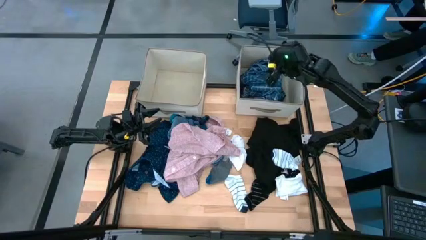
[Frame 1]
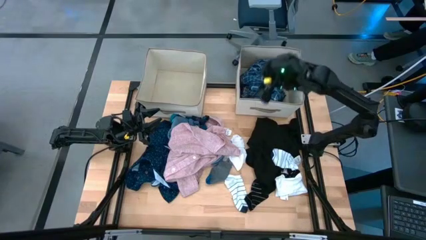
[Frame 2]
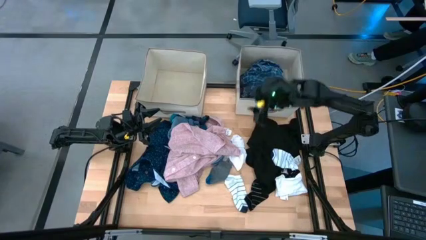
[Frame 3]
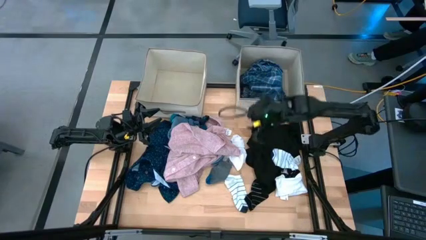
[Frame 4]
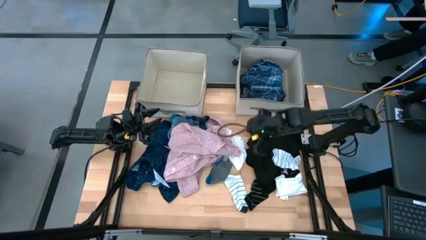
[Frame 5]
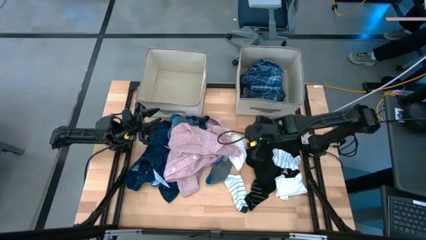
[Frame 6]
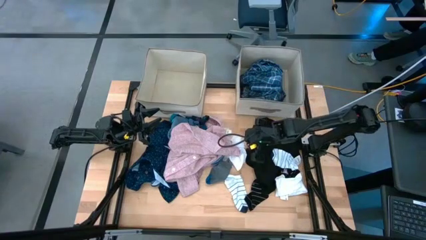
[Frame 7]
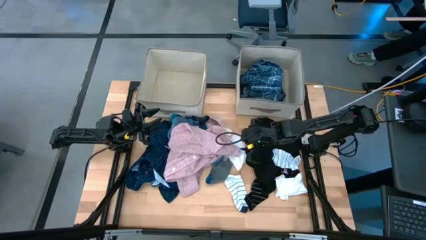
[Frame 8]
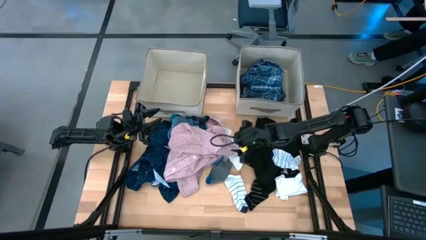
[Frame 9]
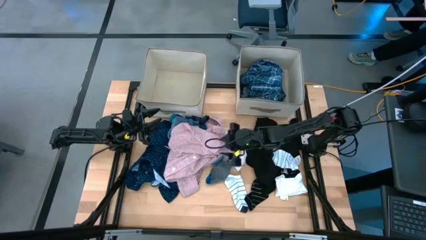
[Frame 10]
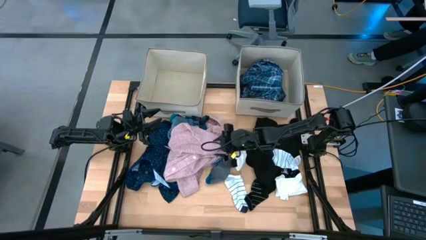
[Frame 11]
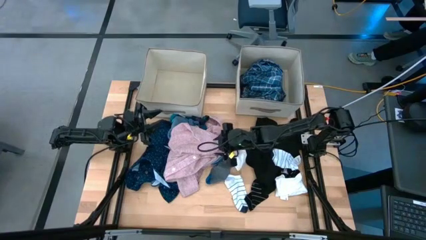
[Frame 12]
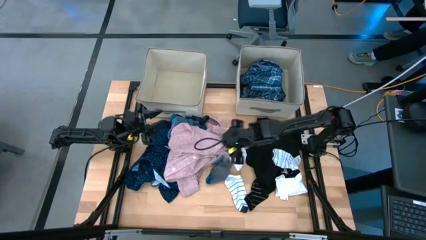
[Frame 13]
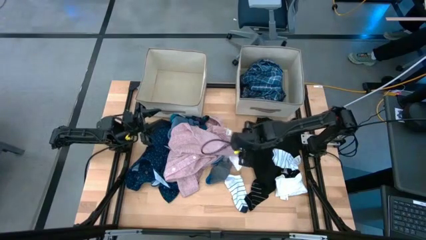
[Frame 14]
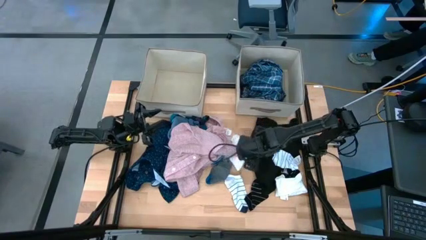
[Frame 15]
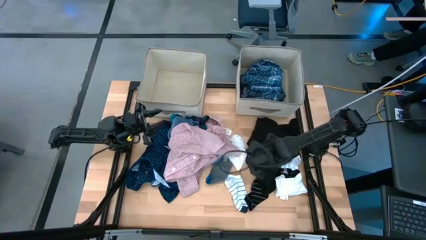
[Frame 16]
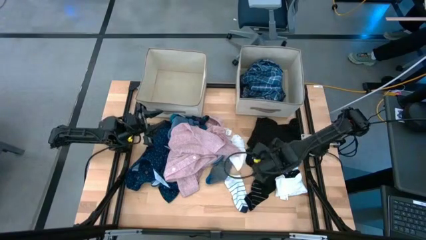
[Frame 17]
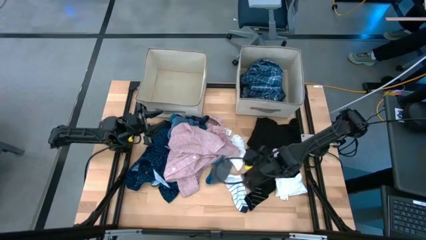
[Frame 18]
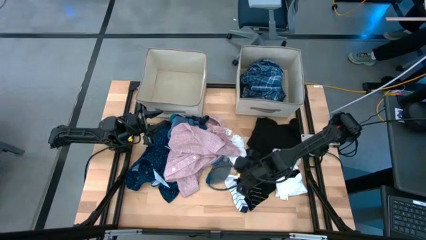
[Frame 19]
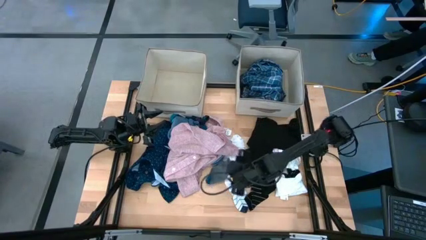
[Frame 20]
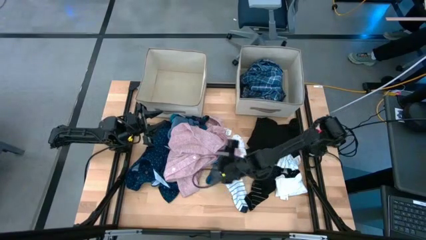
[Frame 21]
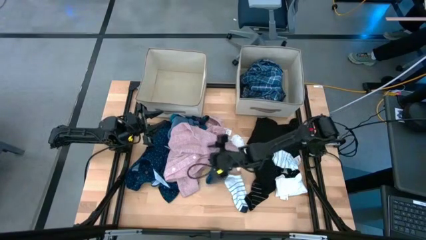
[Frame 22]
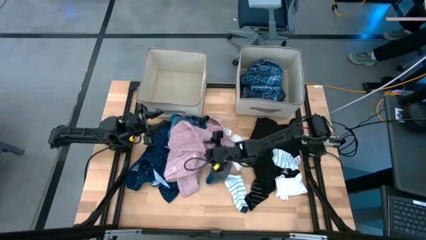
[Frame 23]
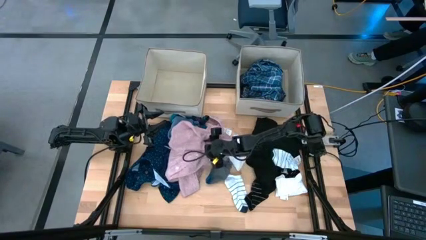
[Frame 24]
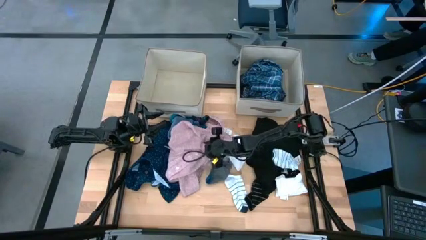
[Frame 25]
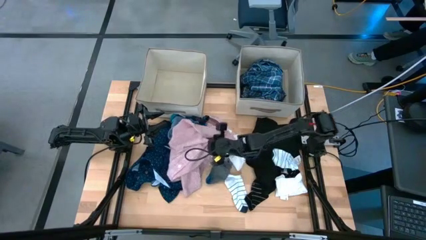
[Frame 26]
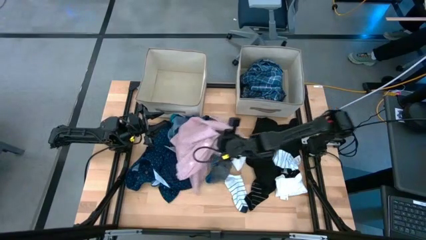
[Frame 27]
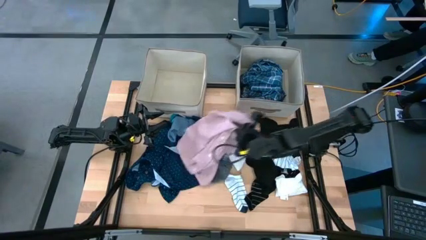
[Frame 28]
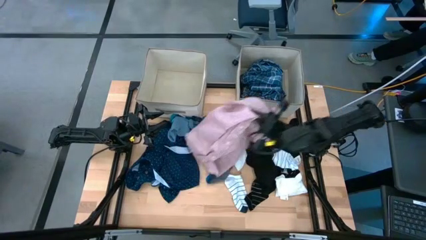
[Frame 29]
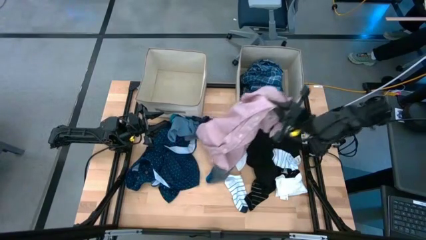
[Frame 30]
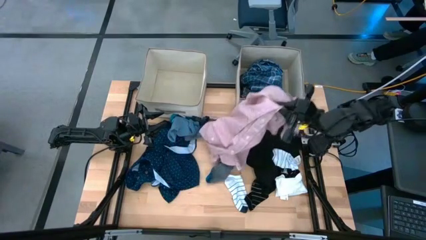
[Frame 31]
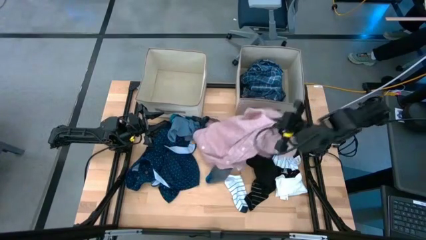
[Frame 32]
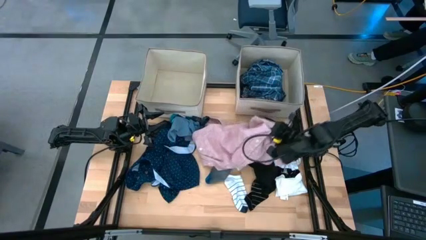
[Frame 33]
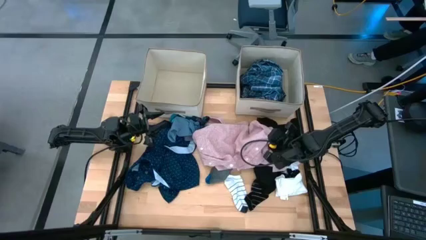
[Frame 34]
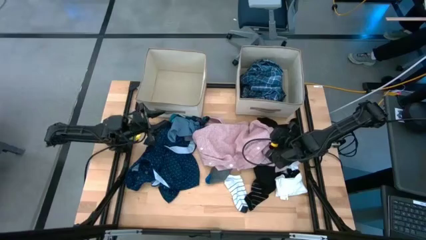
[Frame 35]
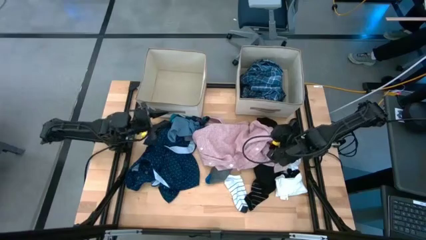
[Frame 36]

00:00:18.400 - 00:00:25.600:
Task: Sort clothes
Adjust the pink shirt

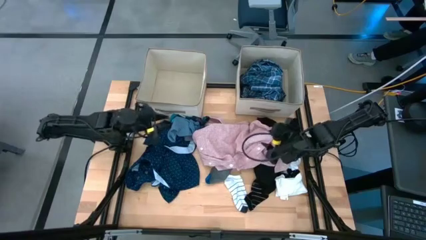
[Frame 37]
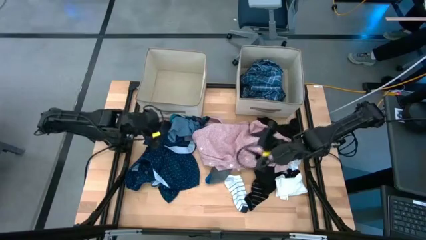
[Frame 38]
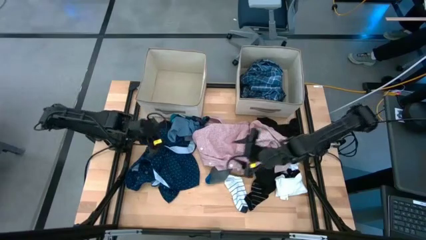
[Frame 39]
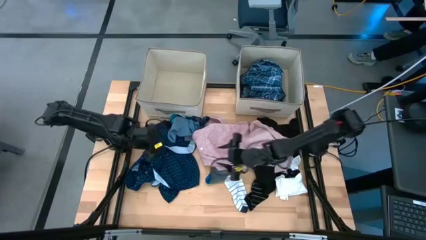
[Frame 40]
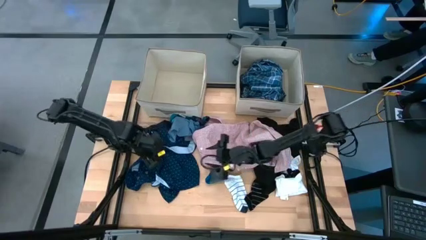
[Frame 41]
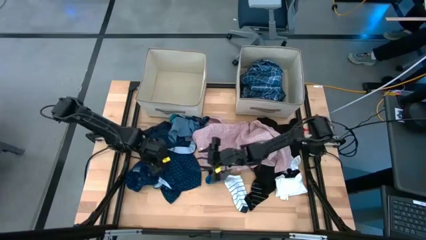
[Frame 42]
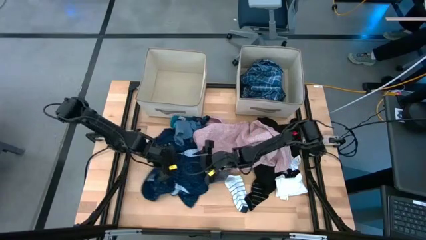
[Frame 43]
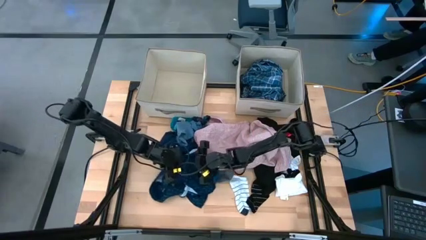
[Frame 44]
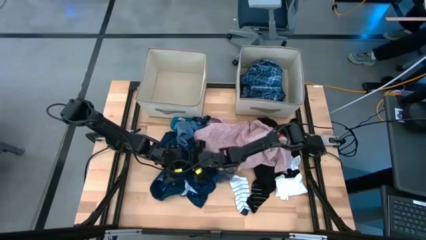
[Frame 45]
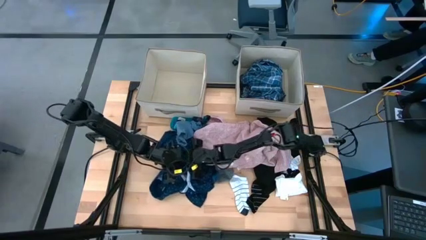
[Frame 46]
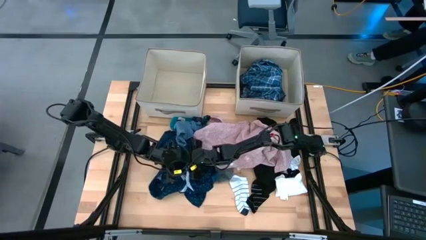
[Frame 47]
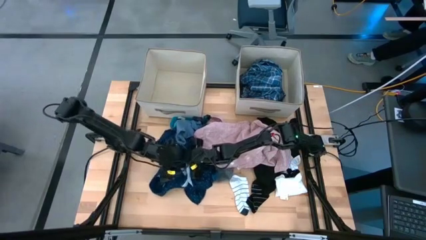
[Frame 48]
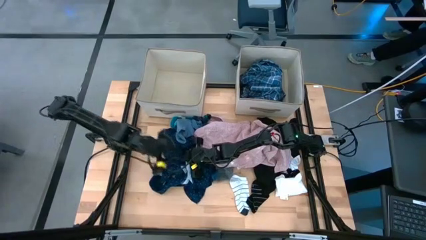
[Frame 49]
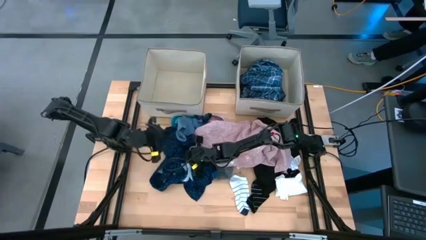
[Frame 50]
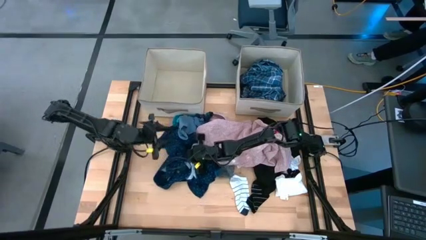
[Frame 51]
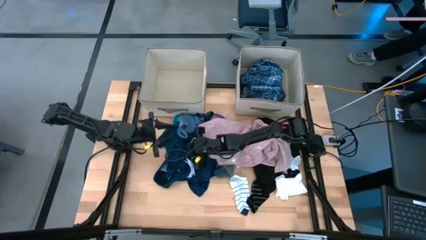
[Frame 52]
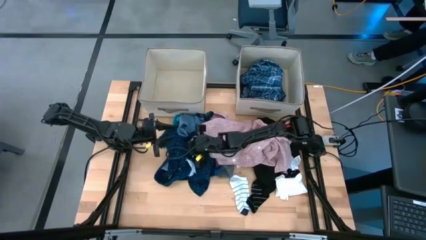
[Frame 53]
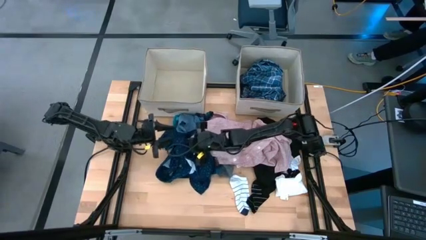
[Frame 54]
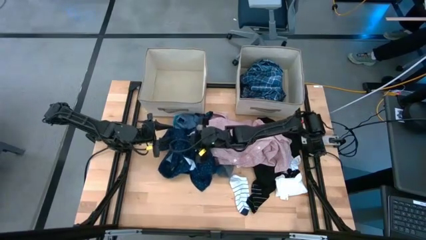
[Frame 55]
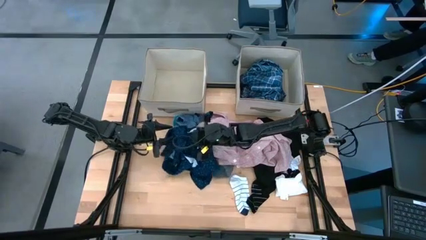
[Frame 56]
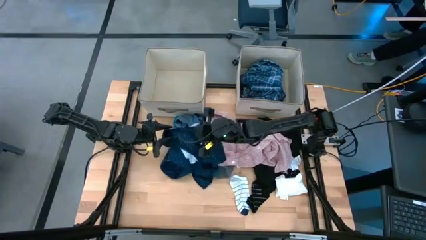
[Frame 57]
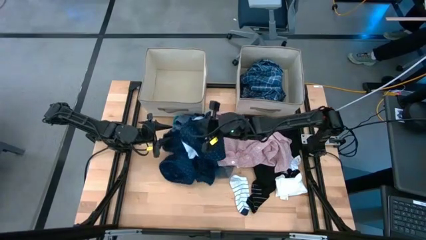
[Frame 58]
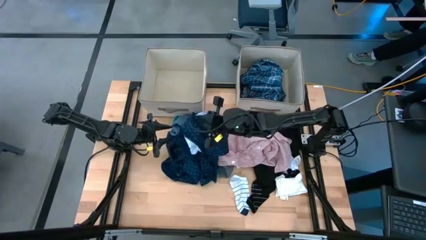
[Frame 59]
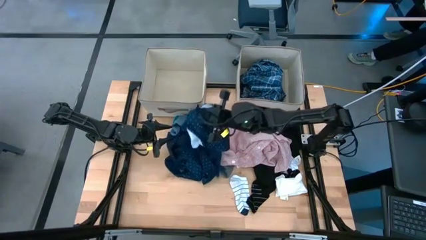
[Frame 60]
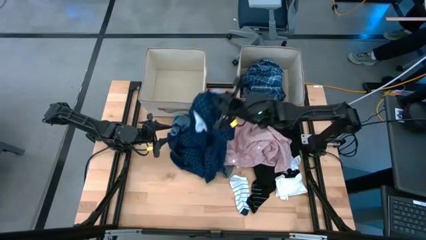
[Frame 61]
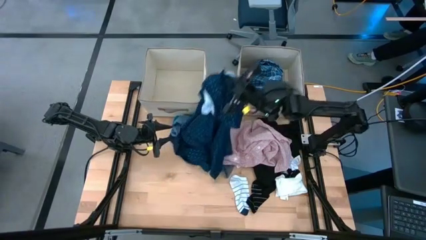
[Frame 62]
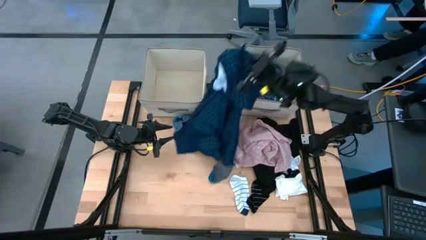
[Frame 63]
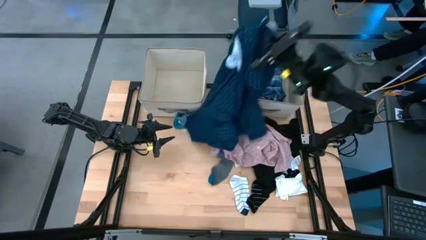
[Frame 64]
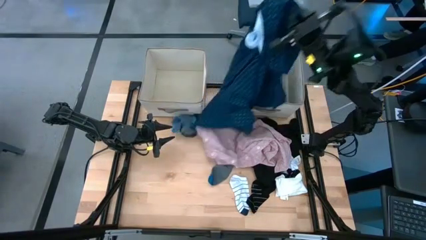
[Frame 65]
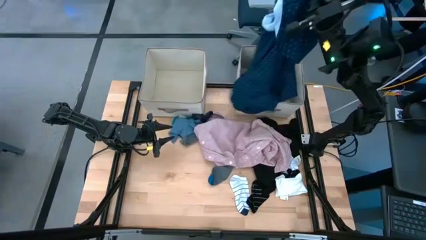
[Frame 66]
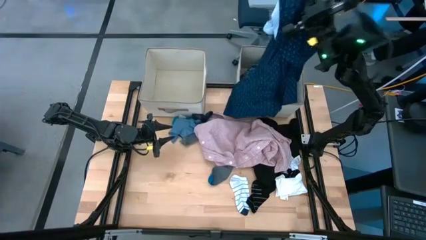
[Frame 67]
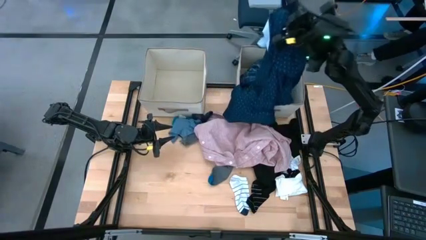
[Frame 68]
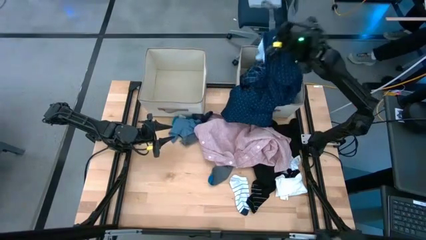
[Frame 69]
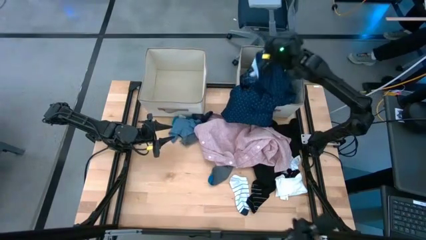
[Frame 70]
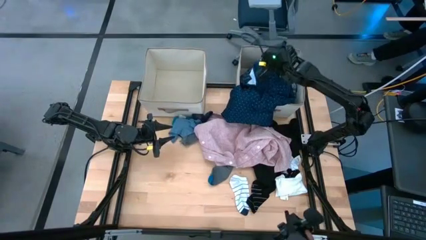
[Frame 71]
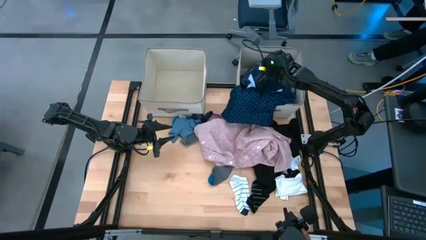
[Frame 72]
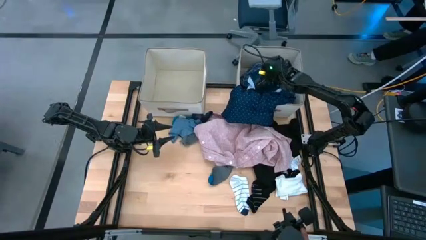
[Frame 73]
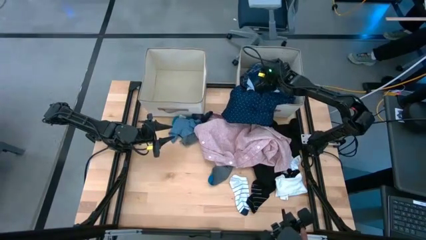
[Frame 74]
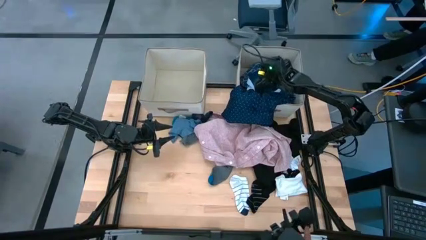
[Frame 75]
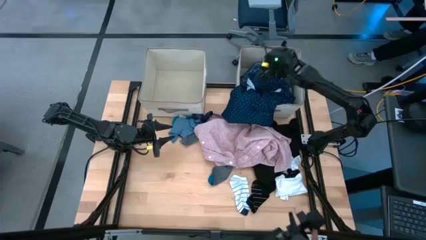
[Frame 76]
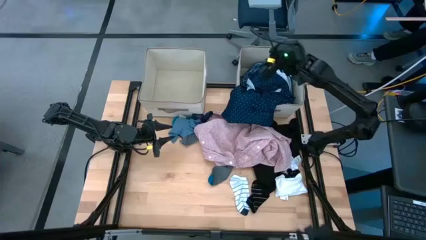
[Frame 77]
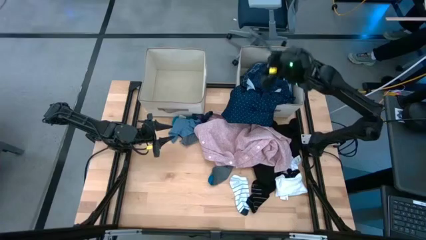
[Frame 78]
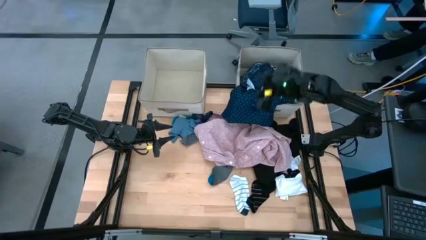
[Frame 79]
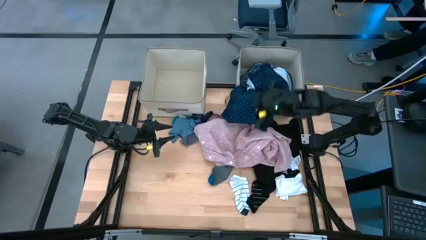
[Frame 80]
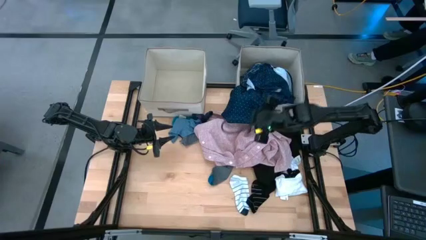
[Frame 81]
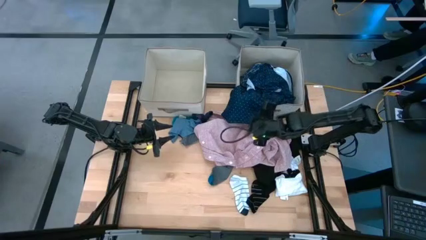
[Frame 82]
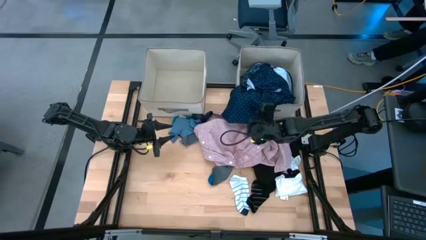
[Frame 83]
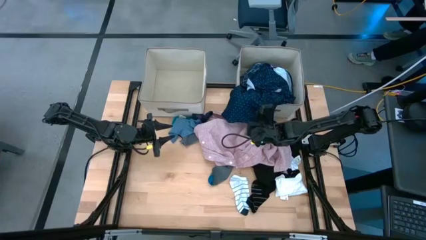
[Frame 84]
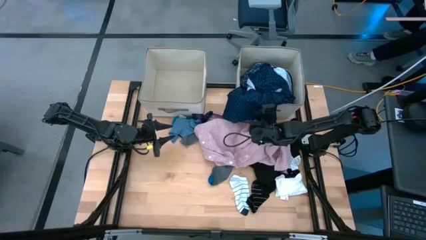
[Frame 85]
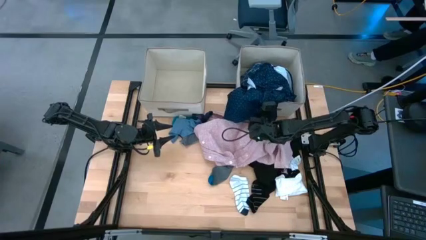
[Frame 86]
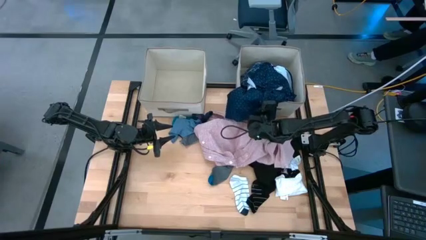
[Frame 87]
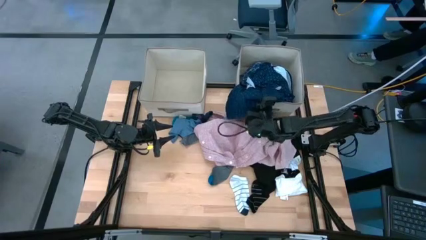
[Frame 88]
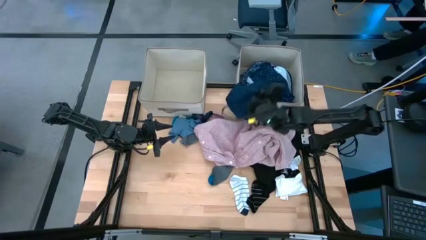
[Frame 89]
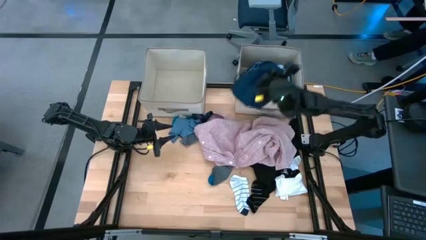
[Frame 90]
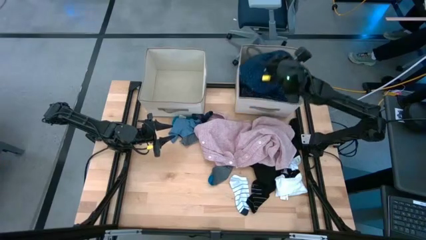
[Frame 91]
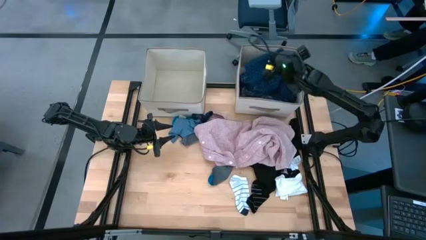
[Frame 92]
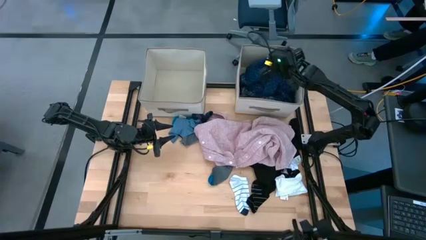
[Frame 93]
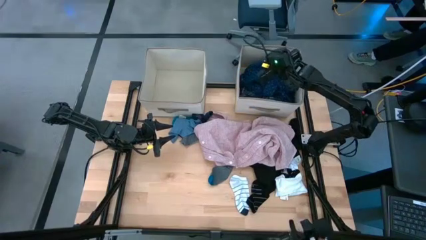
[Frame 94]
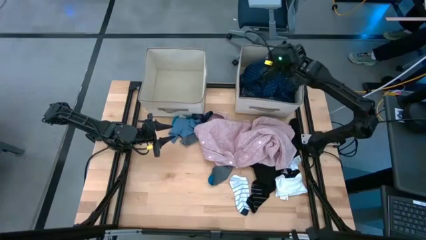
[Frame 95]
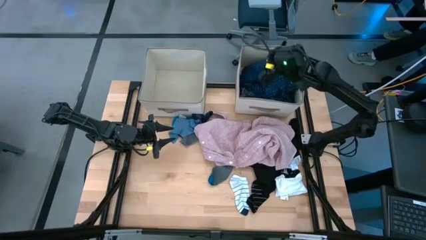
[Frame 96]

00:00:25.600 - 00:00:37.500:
Put the blue shirt into the right laundry organizer
